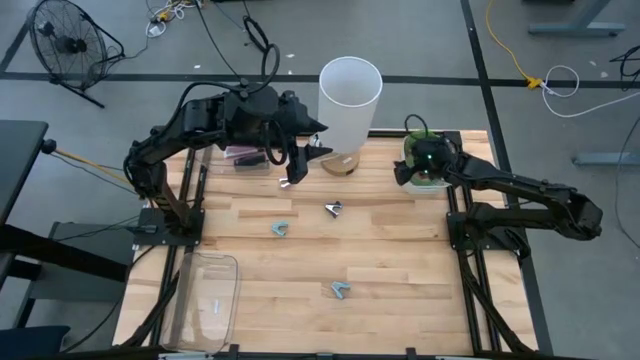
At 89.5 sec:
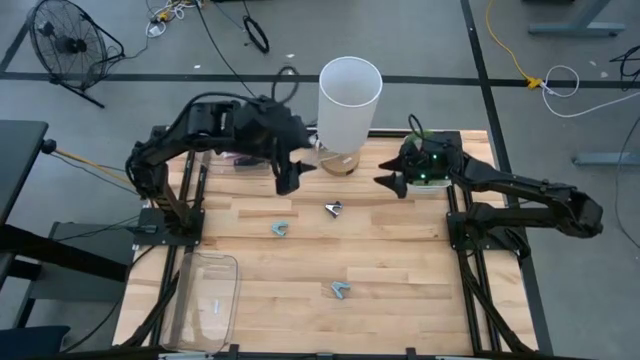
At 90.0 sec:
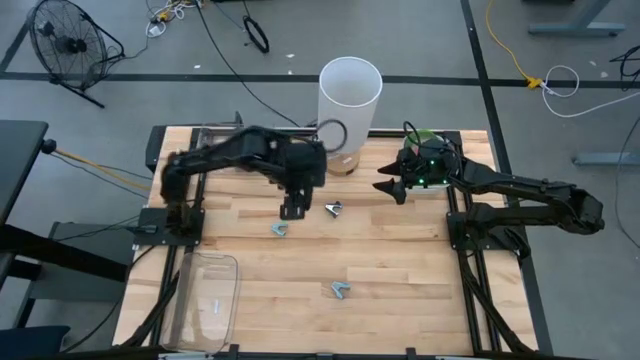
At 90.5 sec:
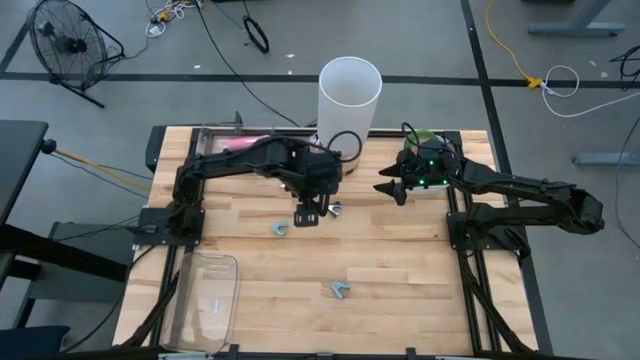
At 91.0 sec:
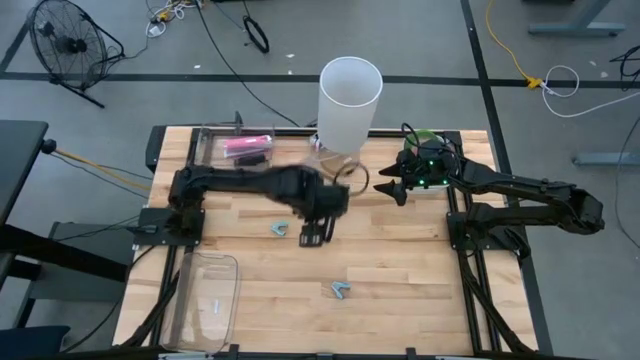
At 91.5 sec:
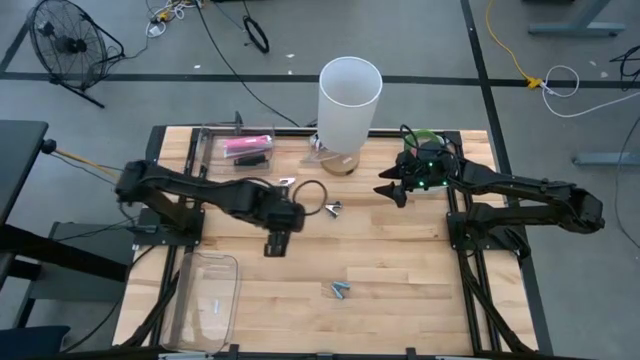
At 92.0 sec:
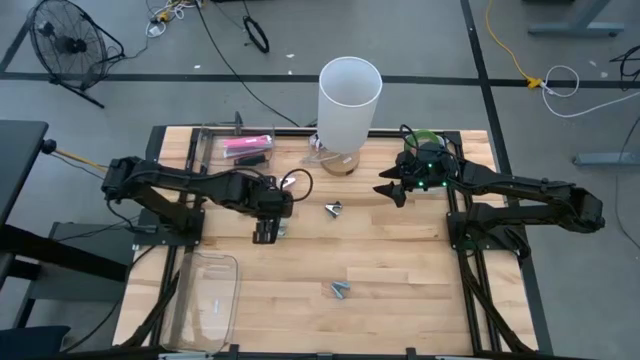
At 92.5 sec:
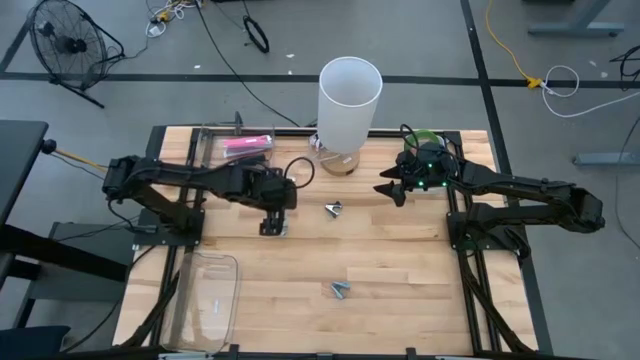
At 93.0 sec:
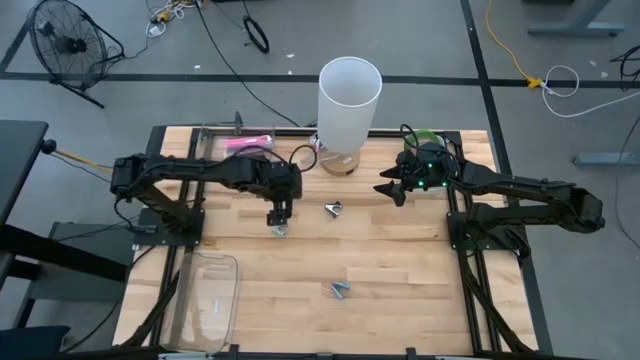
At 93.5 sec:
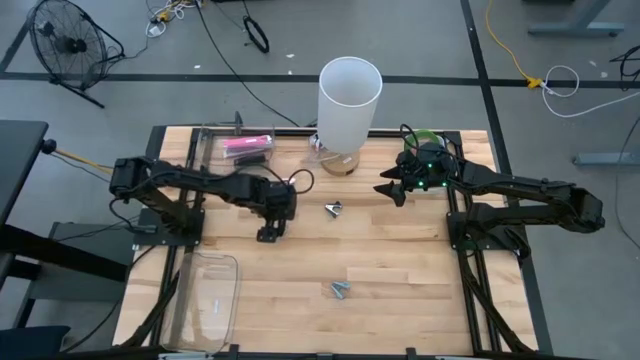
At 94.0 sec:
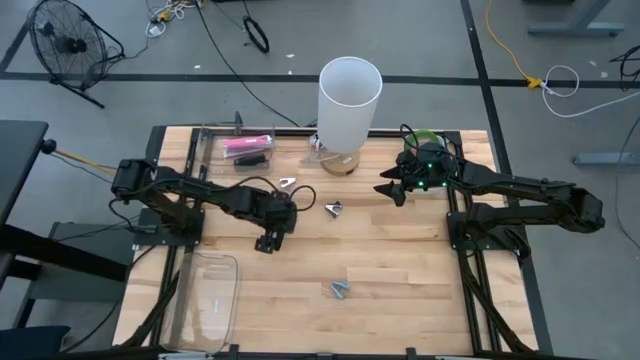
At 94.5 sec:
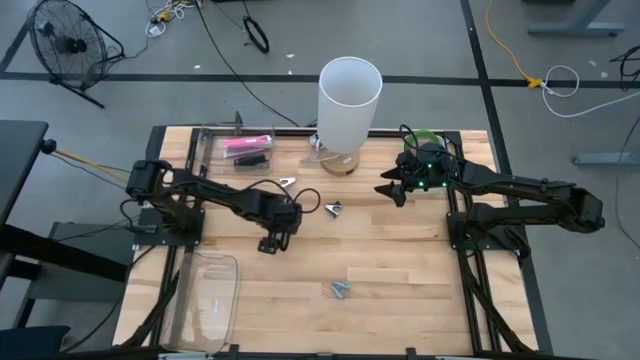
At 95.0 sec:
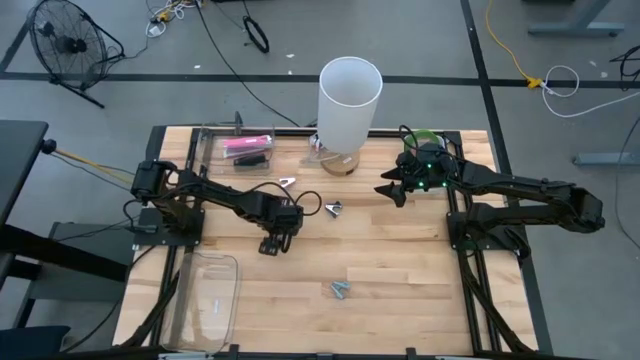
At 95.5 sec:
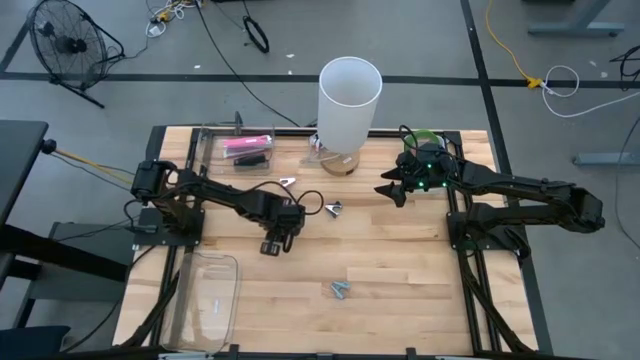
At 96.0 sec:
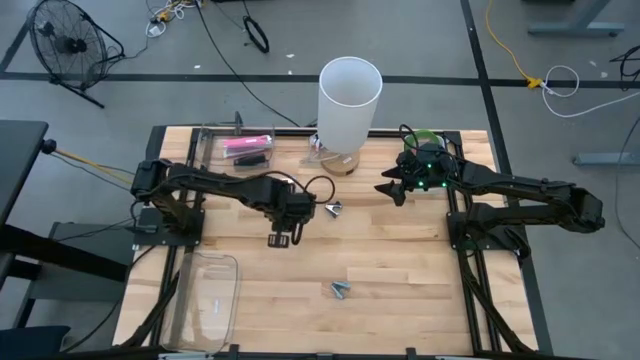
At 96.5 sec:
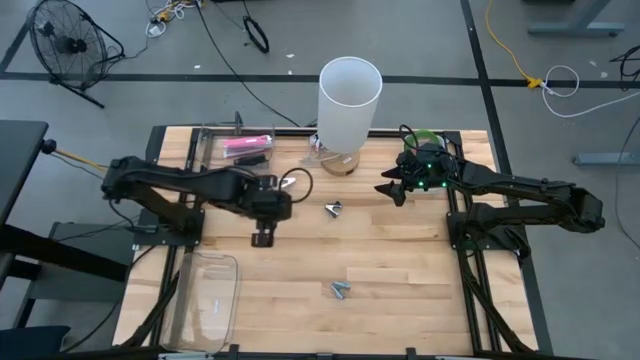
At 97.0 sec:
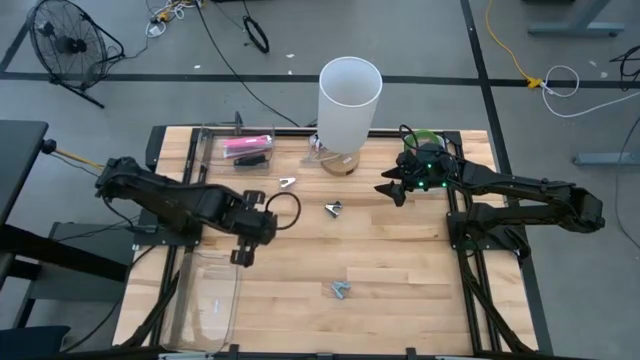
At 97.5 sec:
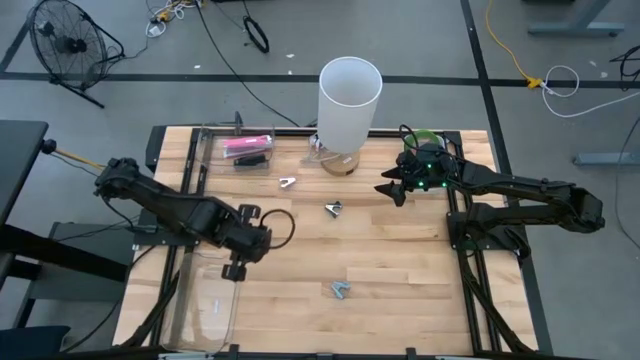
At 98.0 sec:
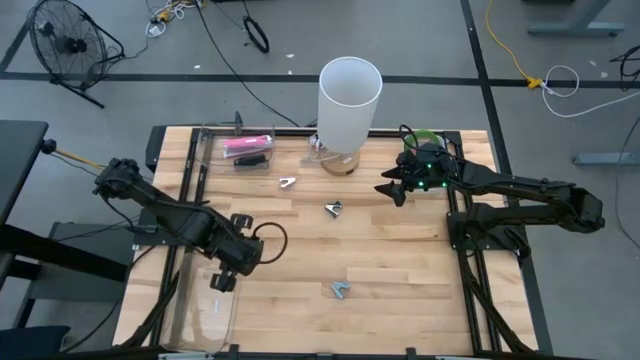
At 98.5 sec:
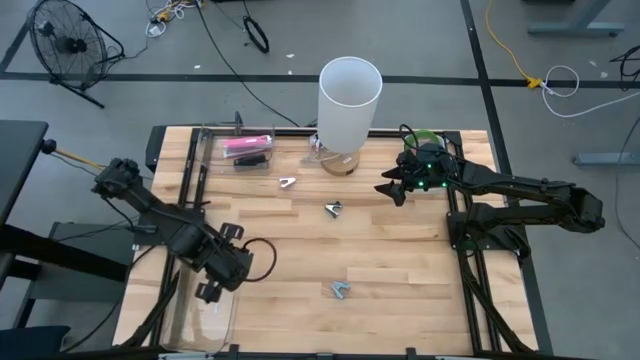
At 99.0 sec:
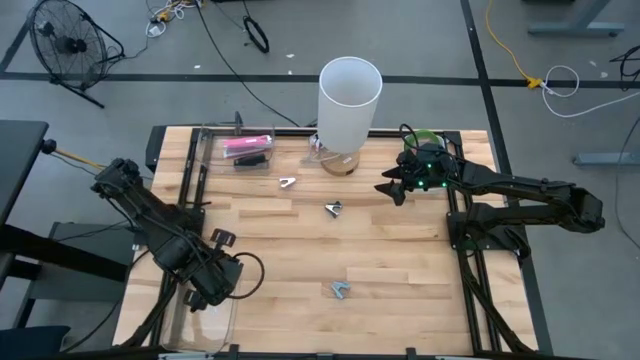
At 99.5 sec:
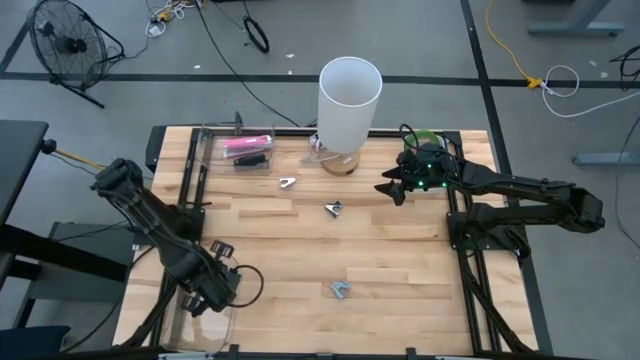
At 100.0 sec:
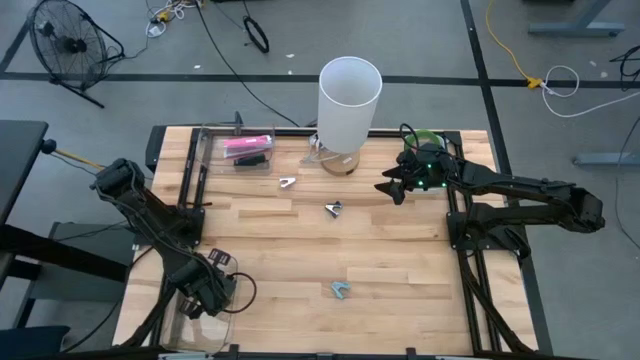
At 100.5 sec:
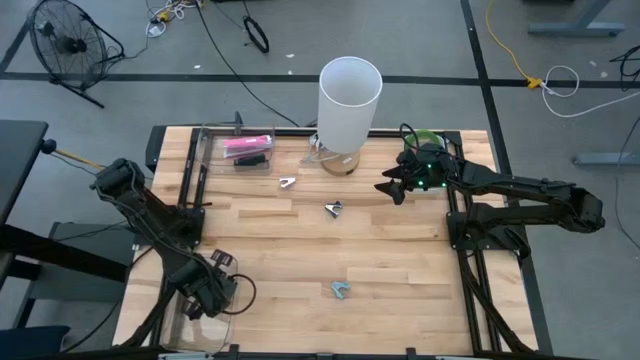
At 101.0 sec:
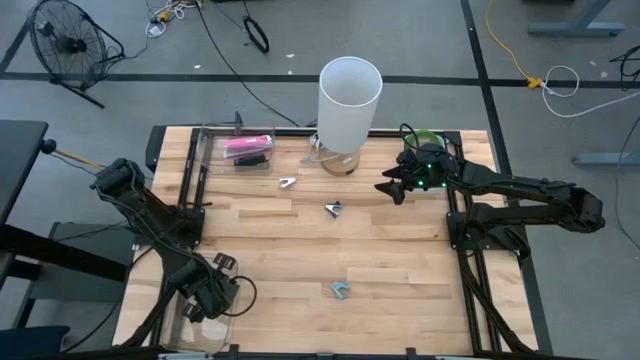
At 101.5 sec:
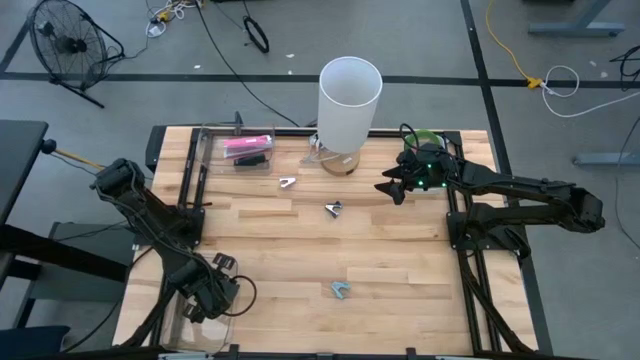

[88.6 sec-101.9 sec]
Task: Pick and place Stapler, Stapler remover, tape
Put the top light blue staple remover into the bottom transparent bin
